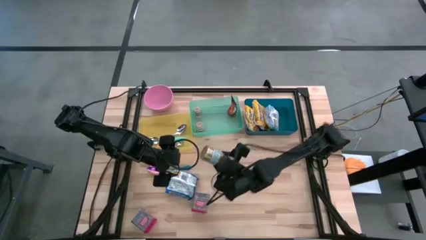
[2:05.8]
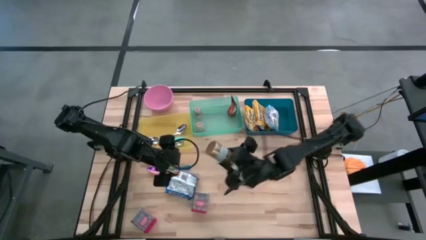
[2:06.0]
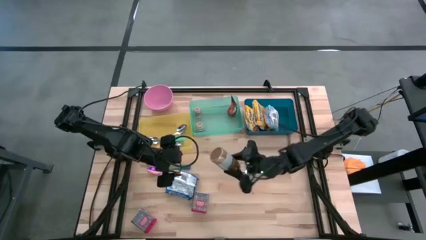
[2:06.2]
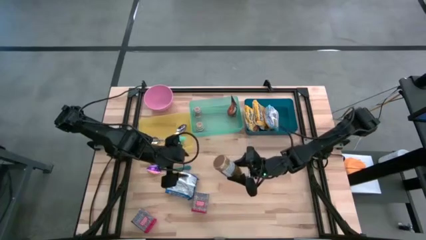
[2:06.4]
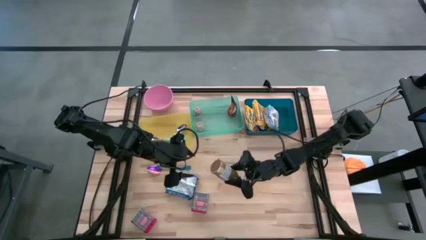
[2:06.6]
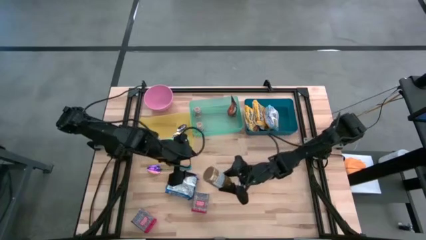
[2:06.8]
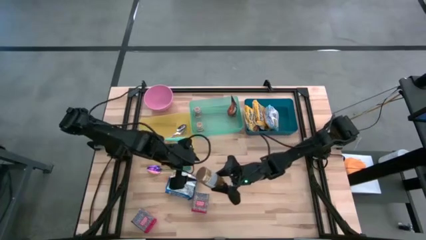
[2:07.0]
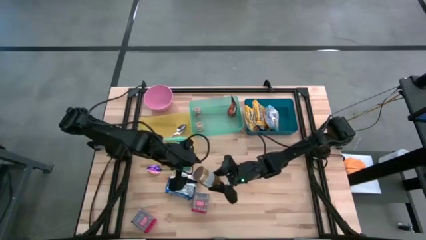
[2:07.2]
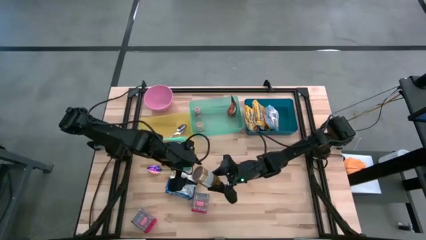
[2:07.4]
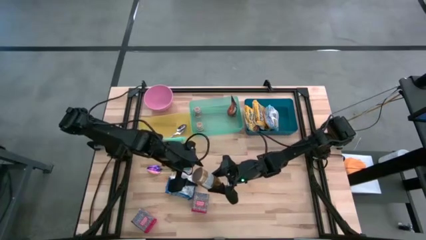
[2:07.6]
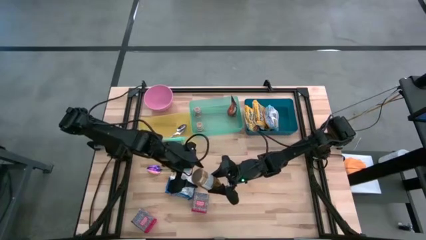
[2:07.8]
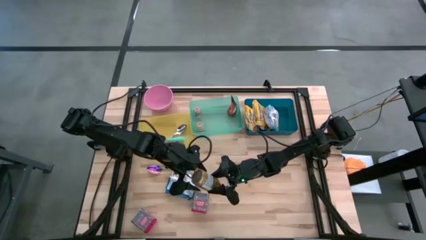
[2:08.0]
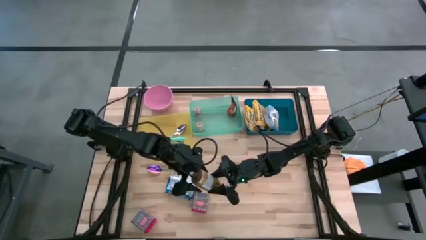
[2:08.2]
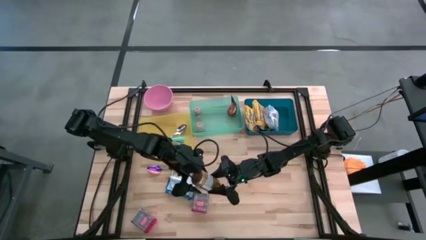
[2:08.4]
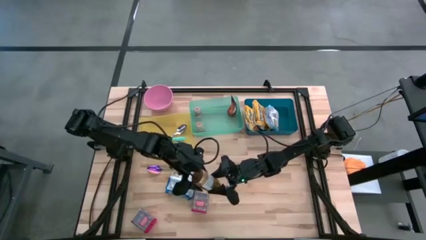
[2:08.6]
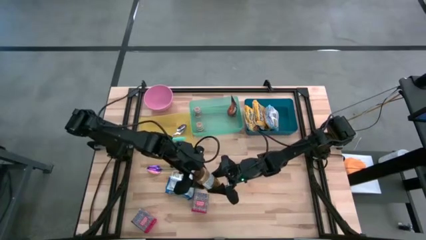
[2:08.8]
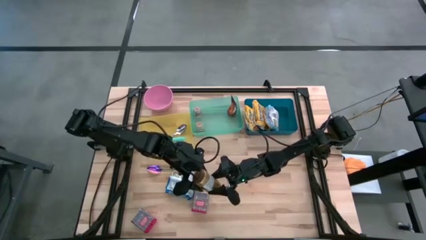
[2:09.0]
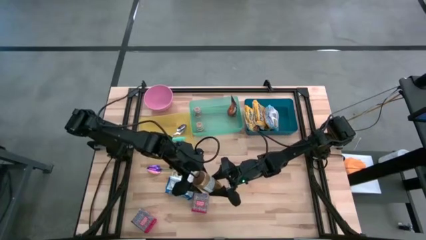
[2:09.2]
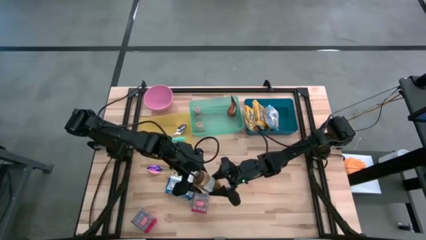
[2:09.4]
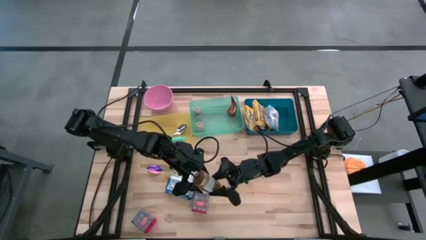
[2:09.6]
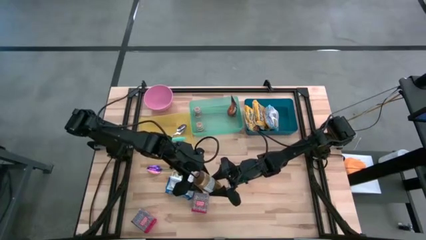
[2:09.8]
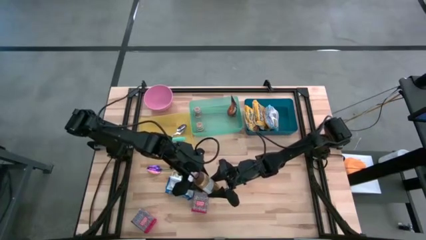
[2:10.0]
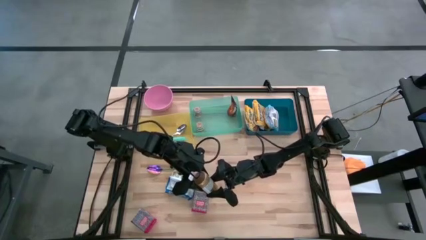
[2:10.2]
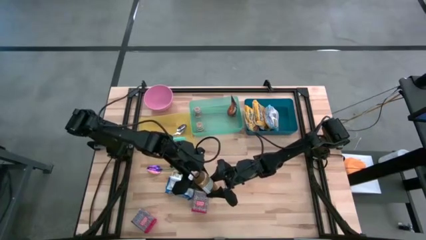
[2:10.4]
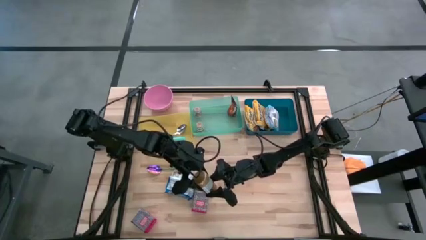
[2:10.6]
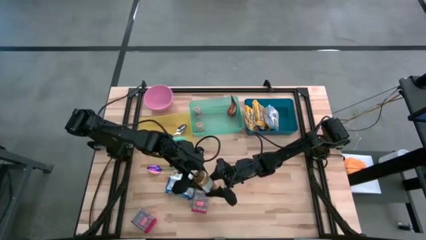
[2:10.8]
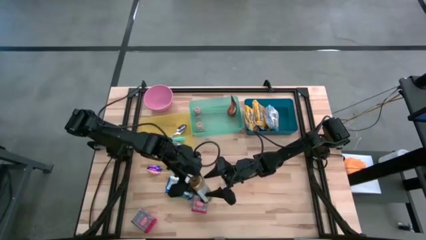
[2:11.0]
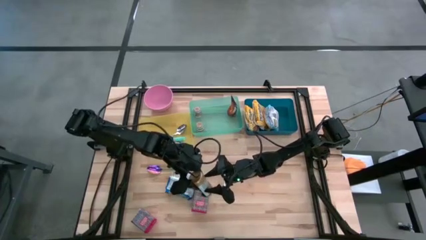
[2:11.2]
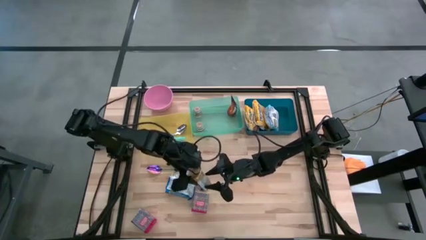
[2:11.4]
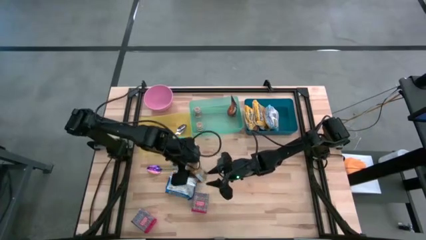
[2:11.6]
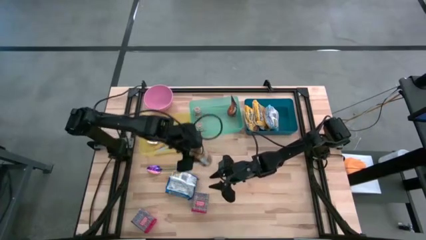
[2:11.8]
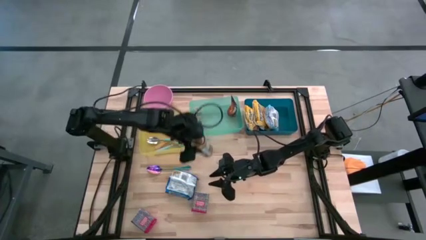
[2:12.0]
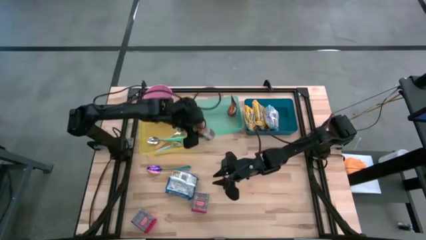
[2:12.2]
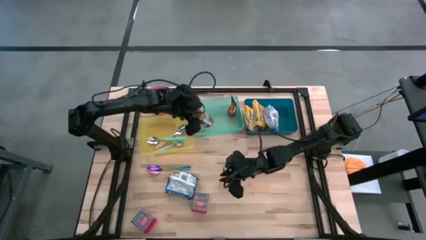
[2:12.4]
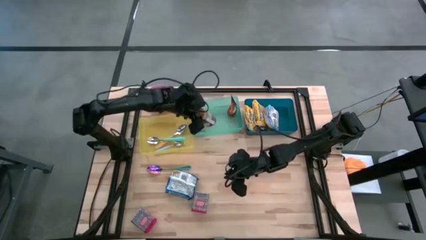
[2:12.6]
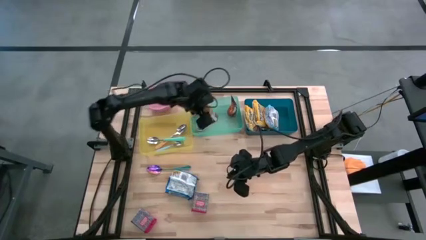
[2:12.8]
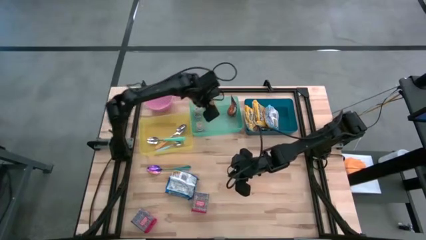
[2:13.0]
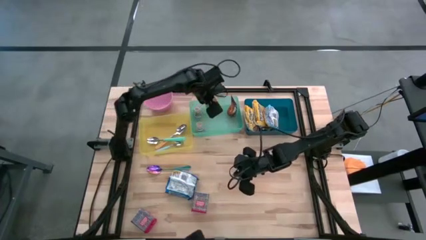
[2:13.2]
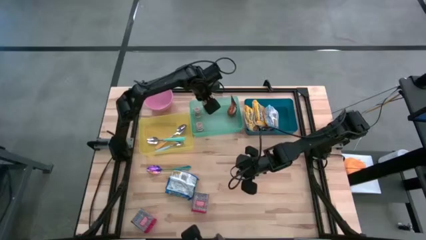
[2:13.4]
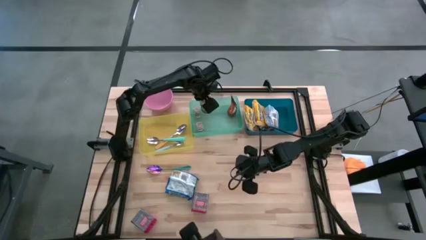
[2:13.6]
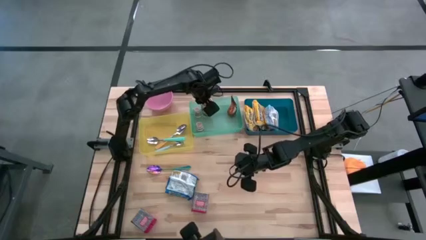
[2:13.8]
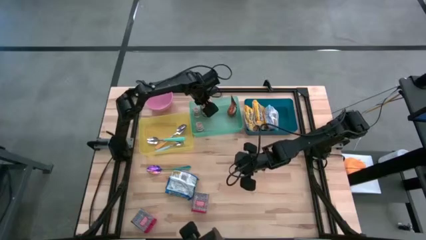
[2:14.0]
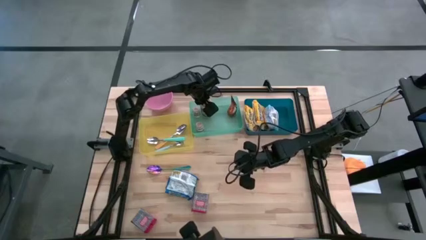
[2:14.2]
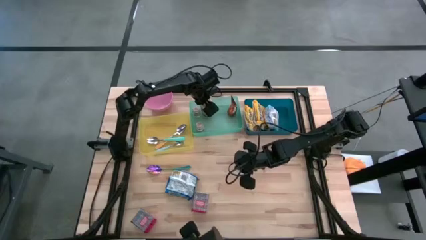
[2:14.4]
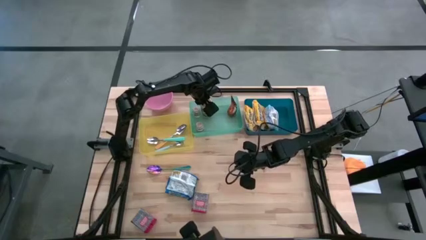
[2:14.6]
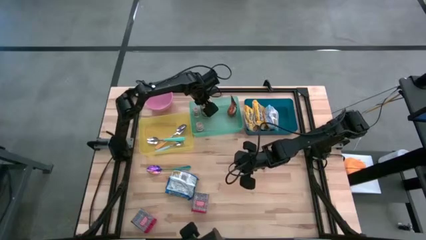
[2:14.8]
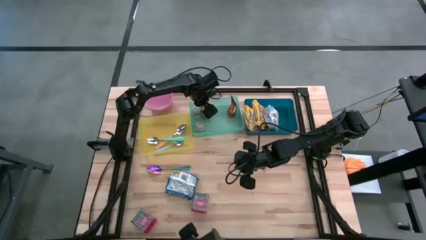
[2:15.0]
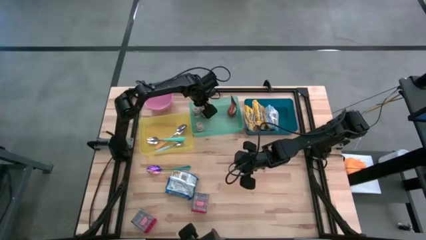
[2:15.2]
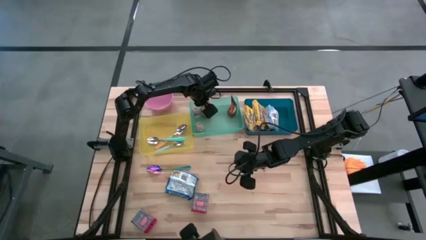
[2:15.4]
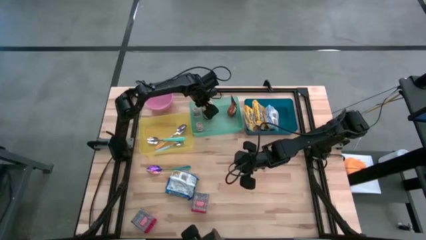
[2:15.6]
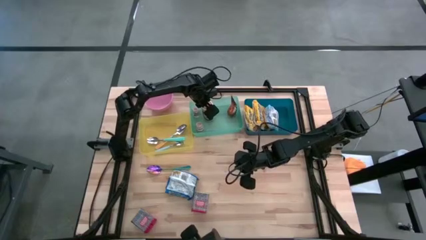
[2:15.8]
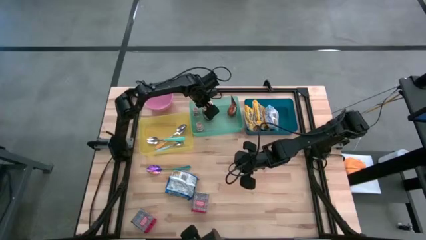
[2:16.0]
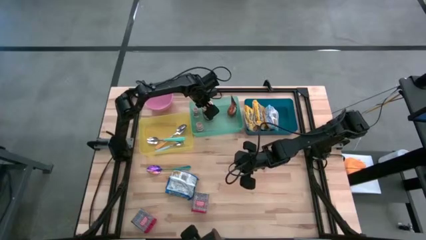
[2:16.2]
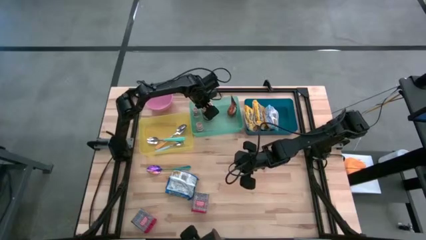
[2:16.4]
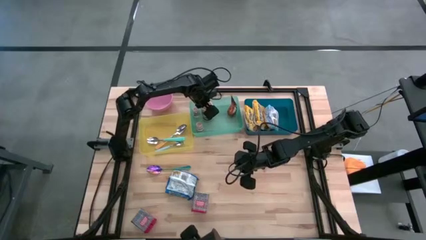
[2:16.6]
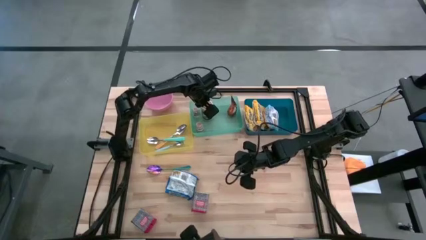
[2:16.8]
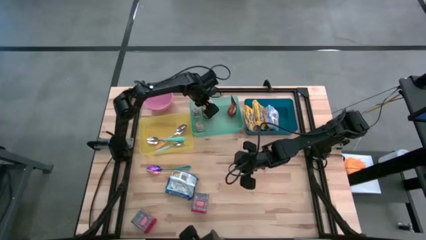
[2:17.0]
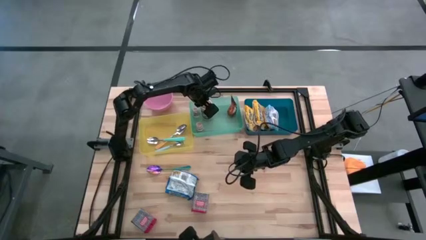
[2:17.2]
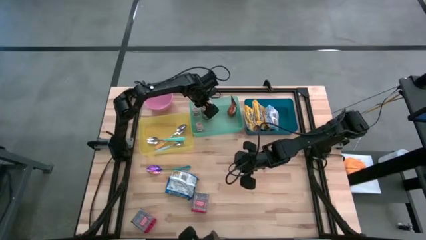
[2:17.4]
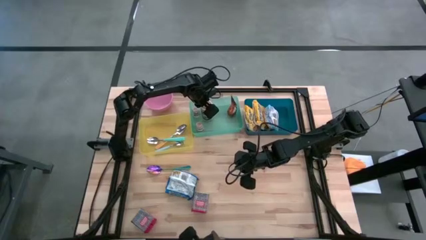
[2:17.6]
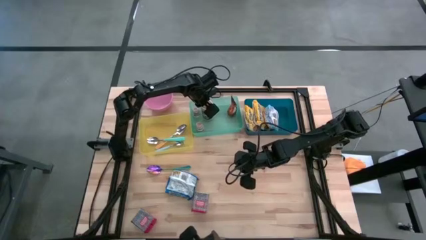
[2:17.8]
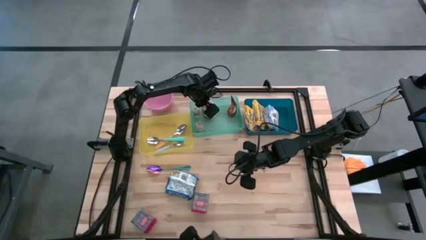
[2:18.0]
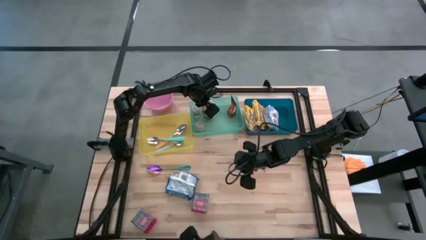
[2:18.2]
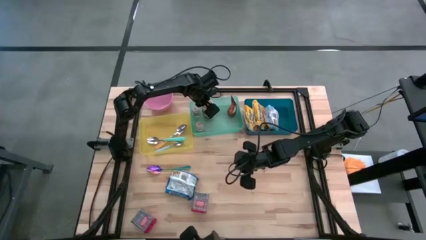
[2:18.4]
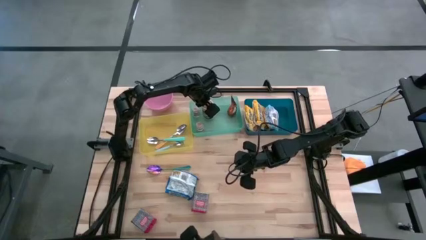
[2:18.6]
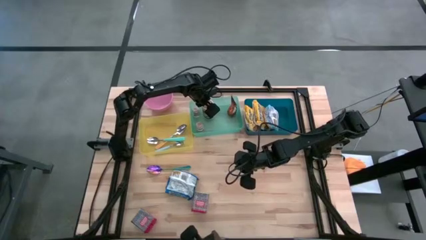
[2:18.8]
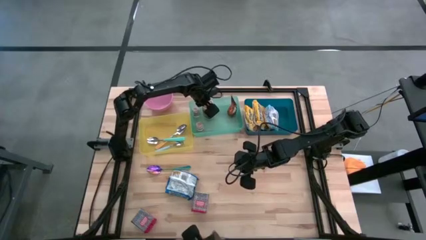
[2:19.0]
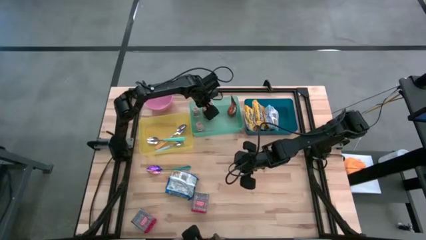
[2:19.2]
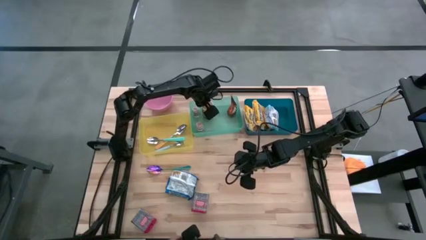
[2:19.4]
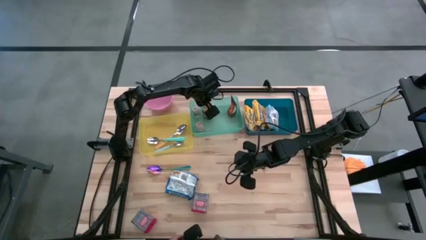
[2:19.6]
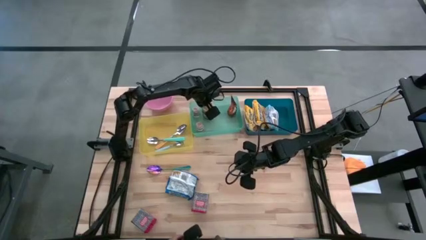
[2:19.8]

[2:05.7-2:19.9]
Put the golden seasoning bottle into the green bin
